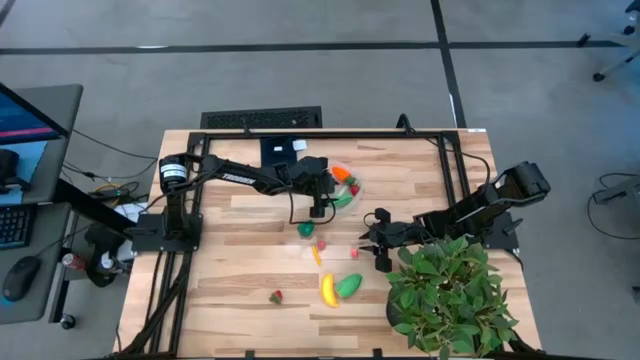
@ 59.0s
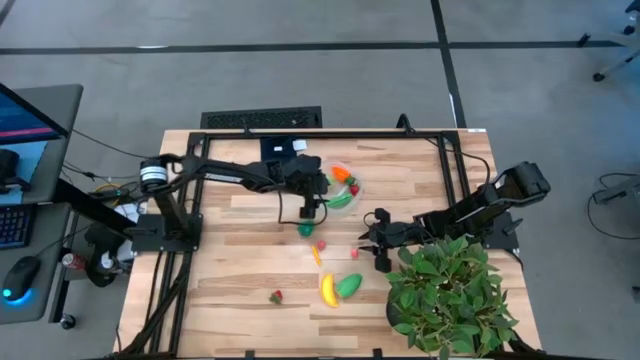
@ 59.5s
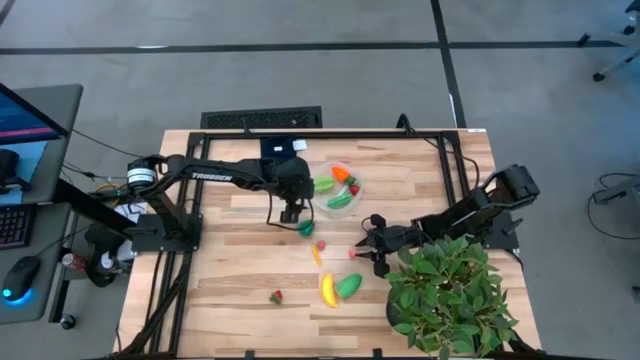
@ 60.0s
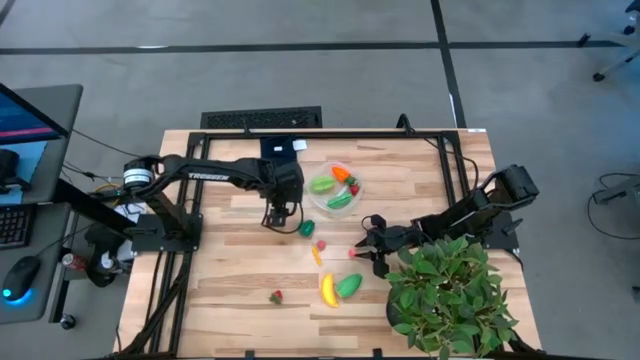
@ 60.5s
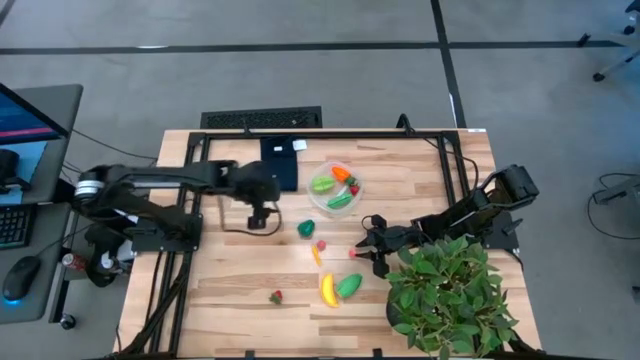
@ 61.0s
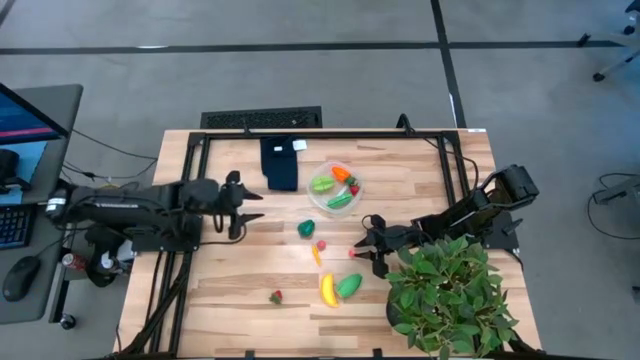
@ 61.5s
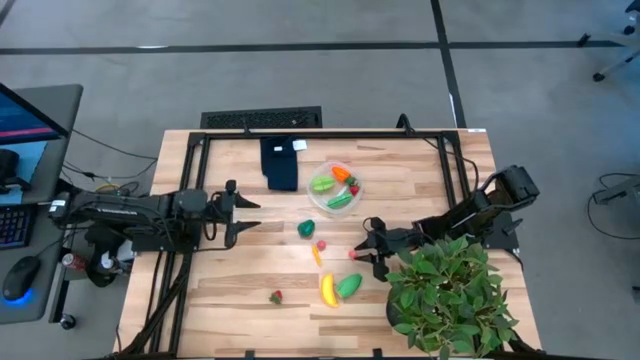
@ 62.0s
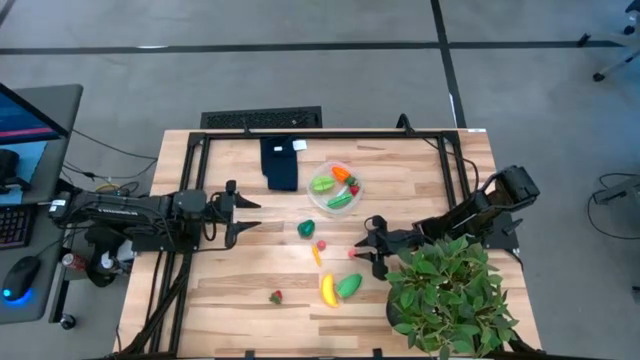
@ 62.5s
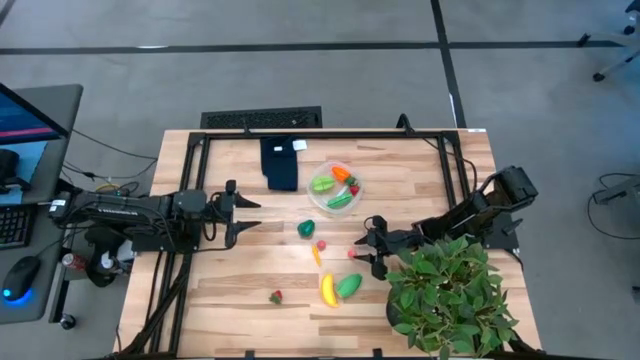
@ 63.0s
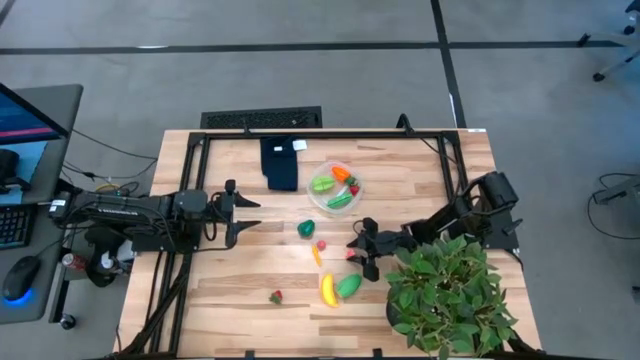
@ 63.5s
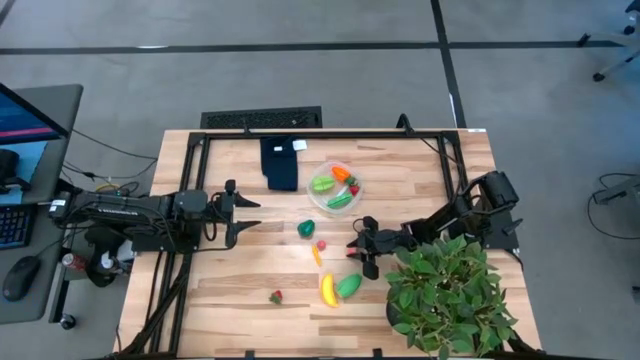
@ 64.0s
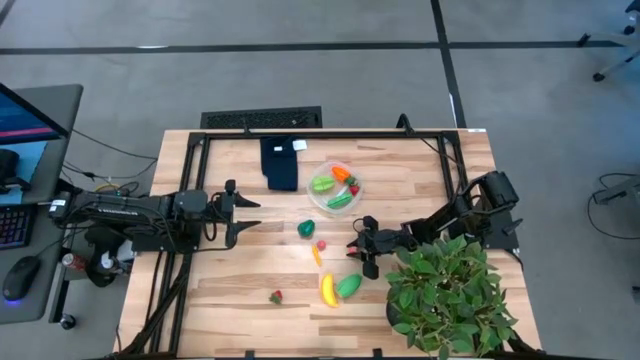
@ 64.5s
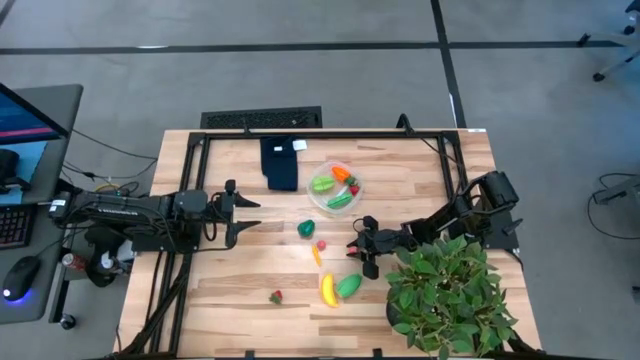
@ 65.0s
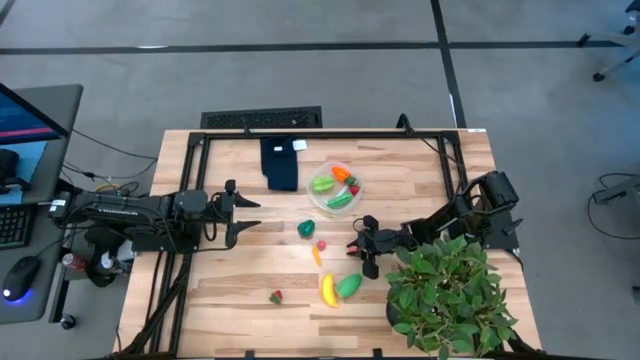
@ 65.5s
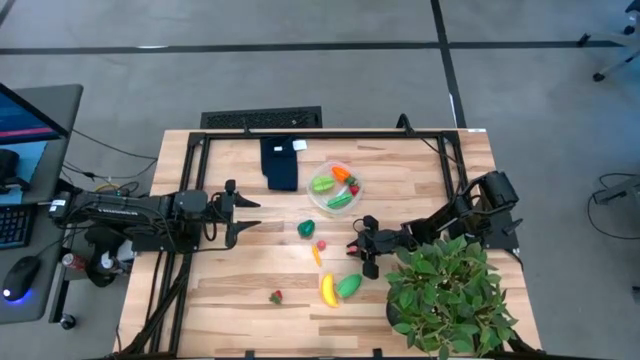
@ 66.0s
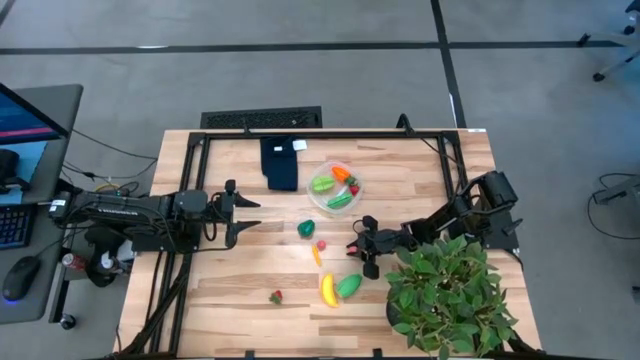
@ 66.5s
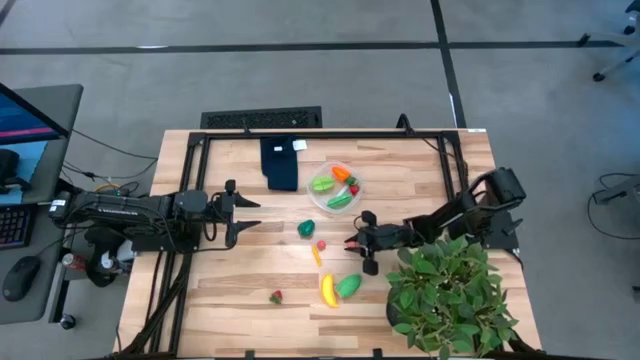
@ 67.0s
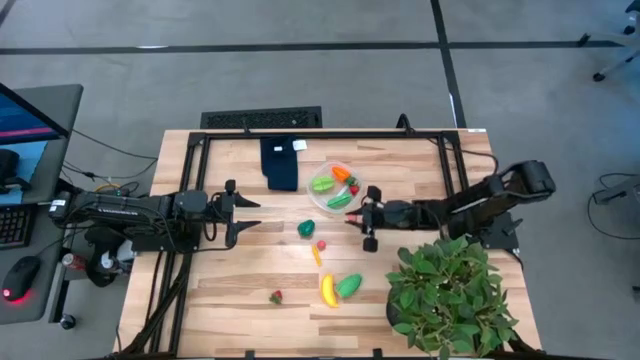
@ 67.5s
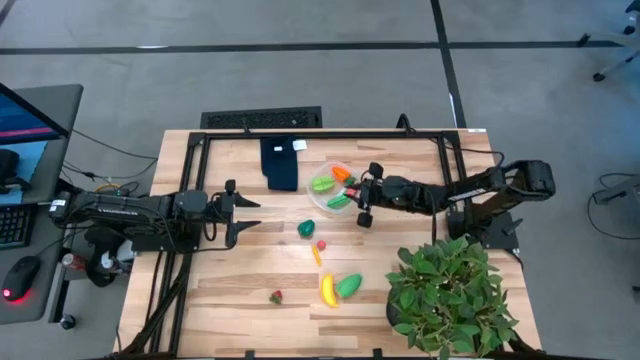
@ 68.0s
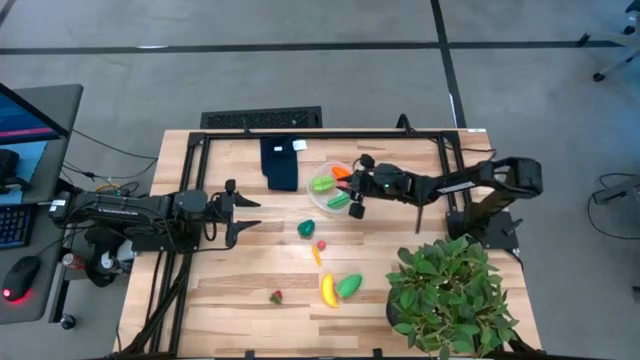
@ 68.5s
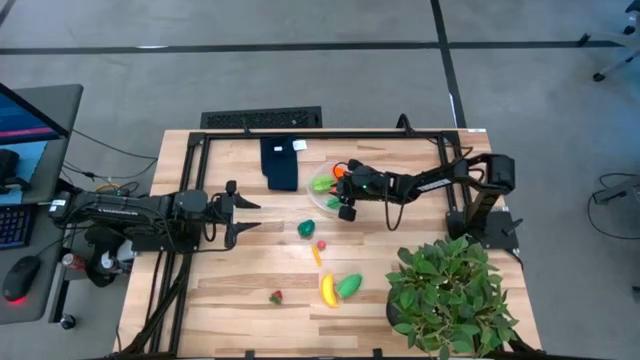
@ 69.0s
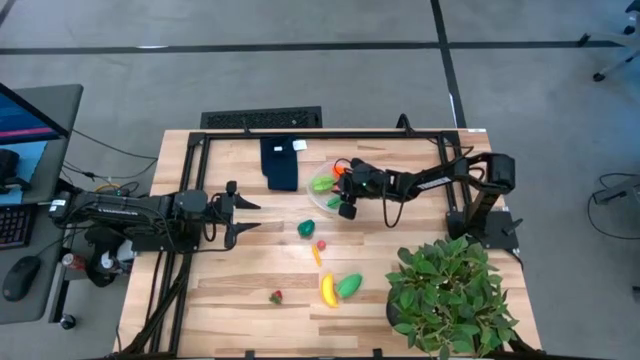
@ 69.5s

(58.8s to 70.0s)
Task: Pick and placing Produce into tupperware
Put the right pink peach into the transparent container

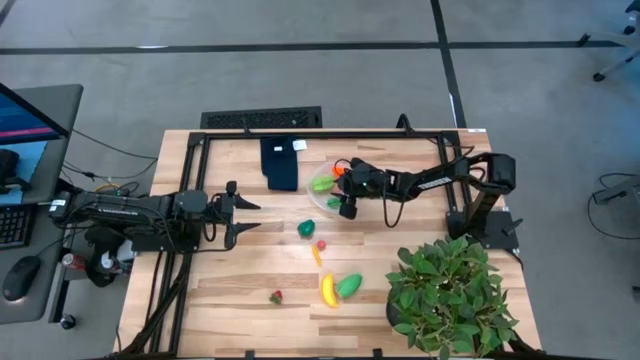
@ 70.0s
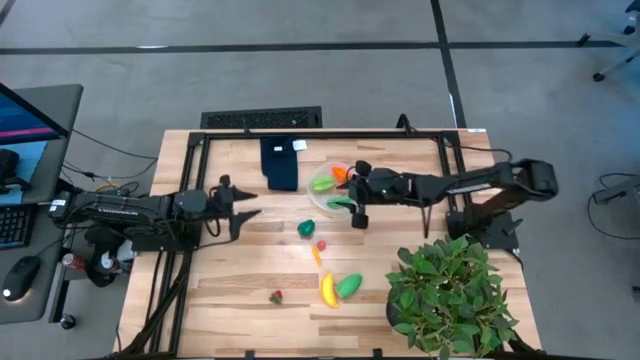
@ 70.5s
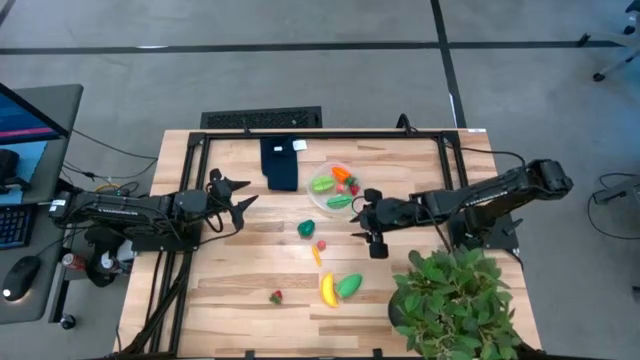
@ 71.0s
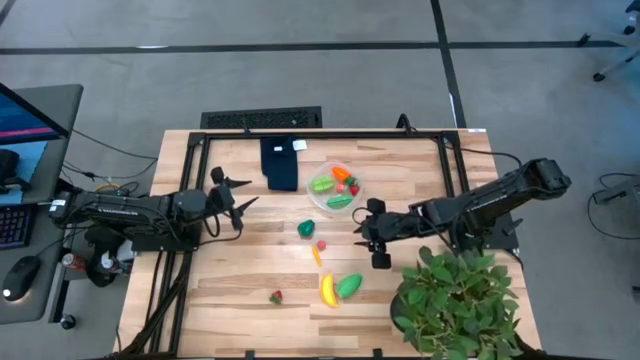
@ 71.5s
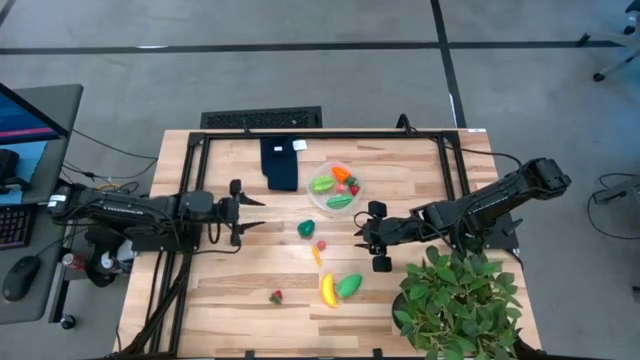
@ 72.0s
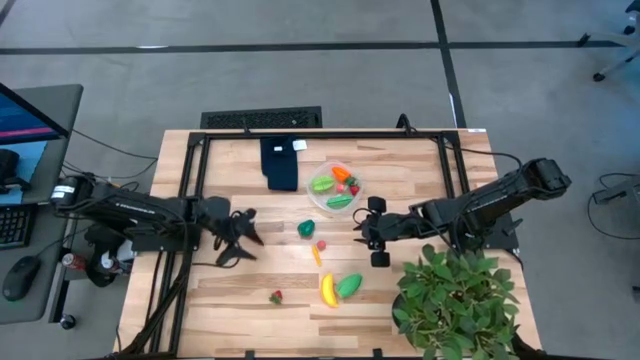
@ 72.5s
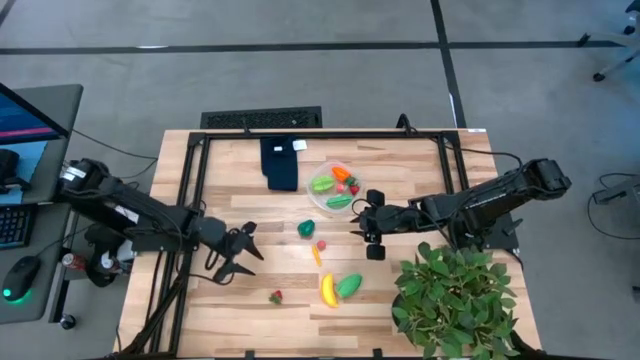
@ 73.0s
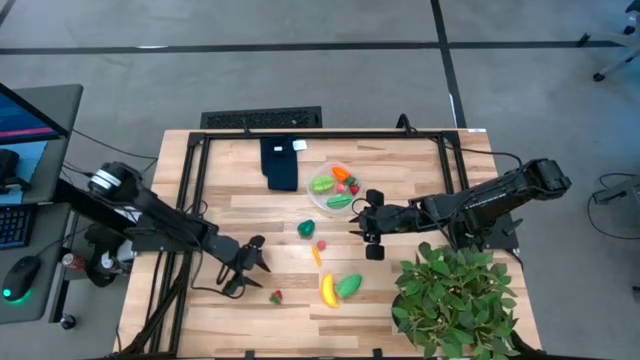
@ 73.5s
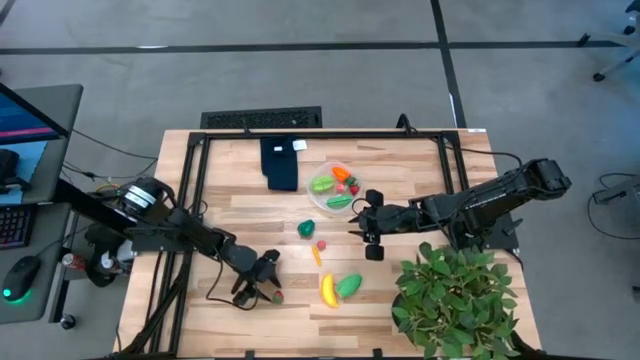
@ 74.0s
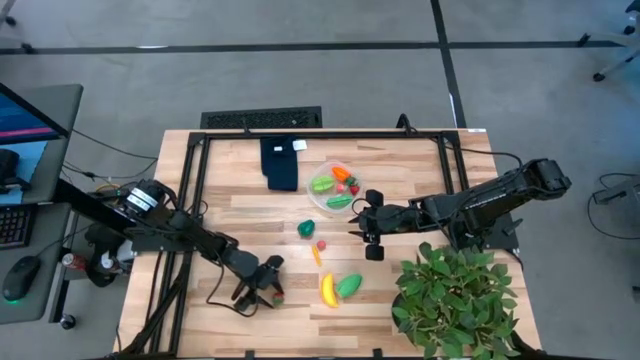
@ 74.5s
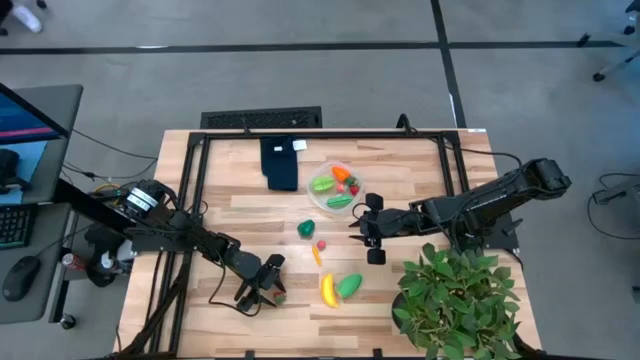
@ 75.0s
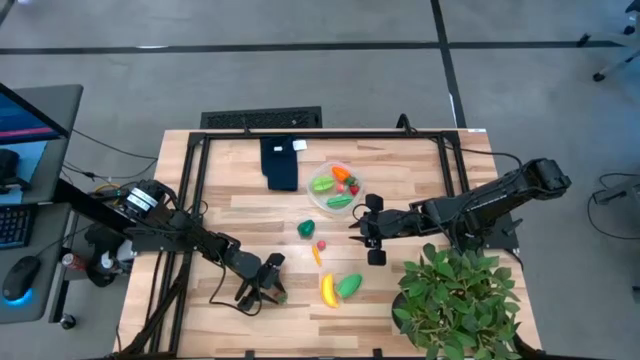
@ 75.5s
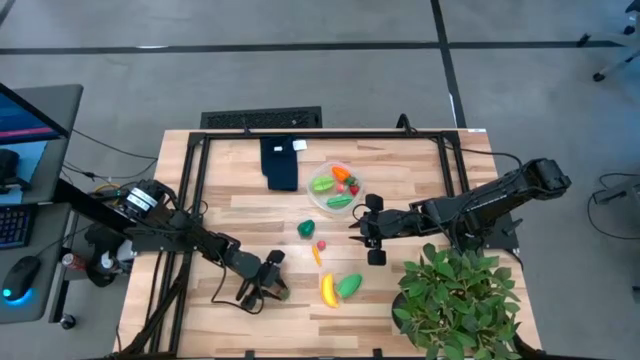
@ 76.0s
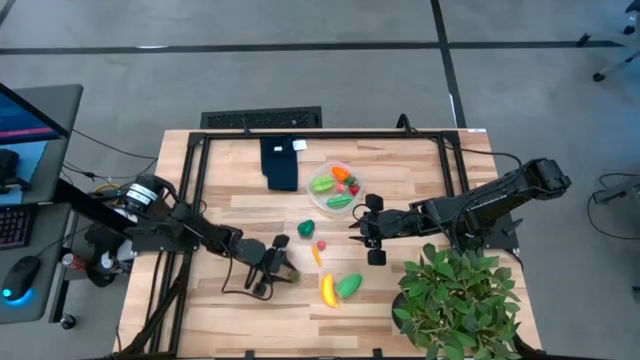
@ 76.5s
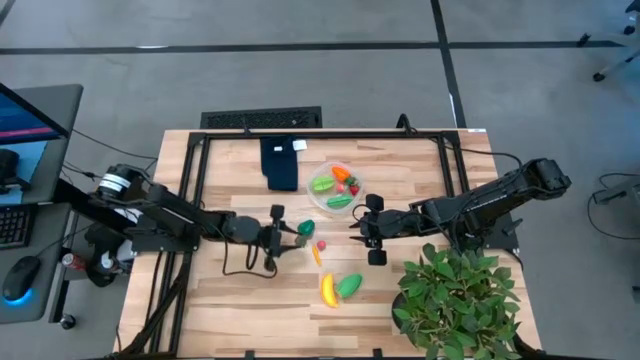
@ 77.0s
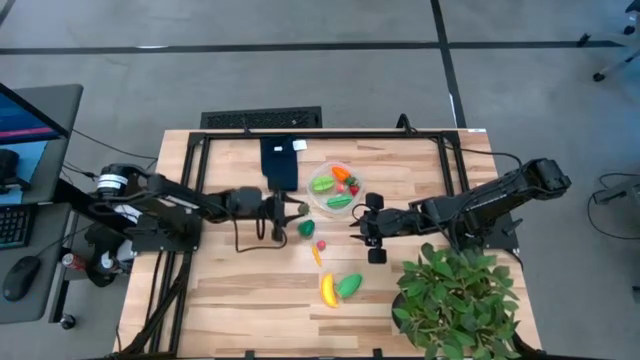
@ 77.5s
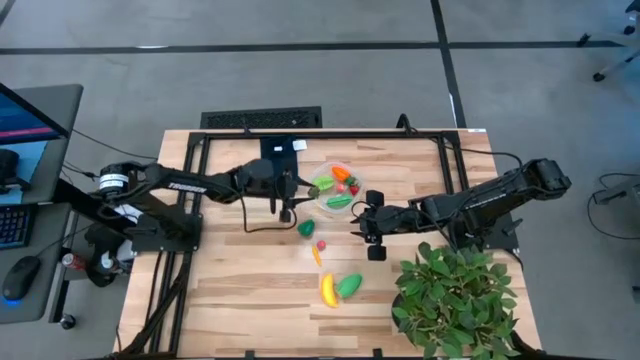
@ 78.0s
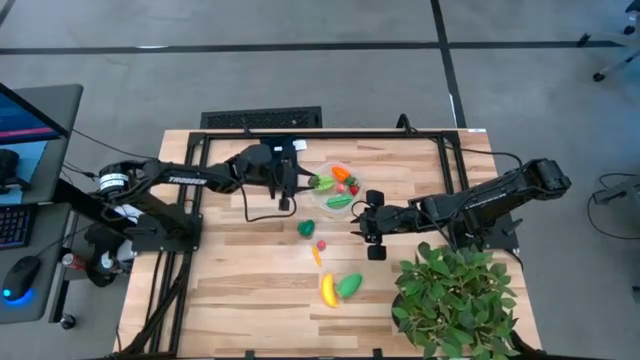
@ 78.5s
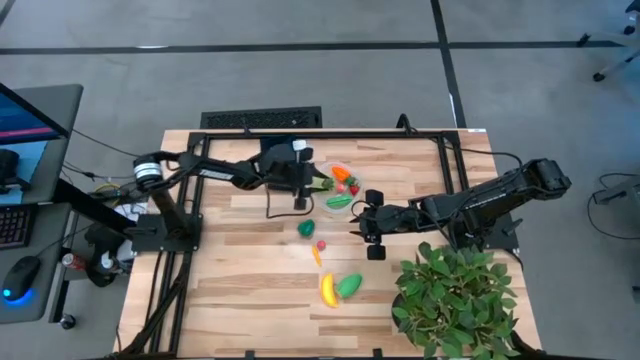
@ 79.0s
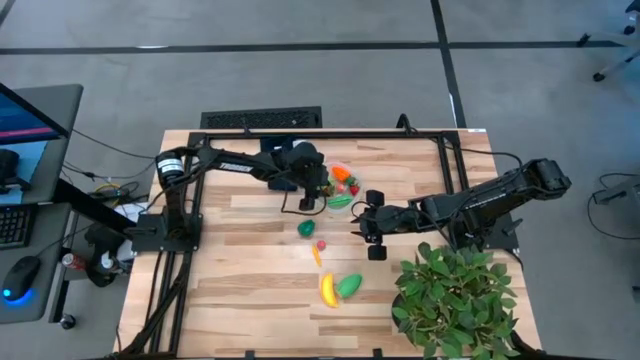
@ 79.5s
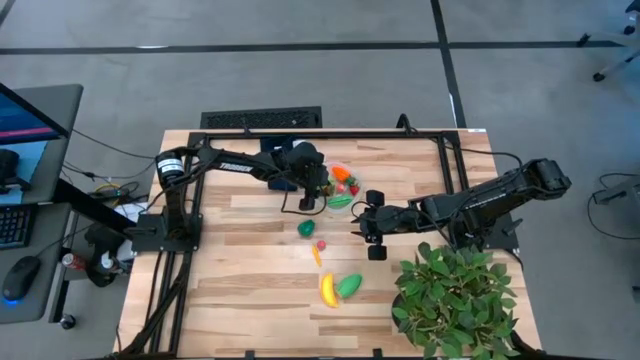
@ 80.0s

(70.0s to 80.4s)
Put the red strawberry into the transparent container

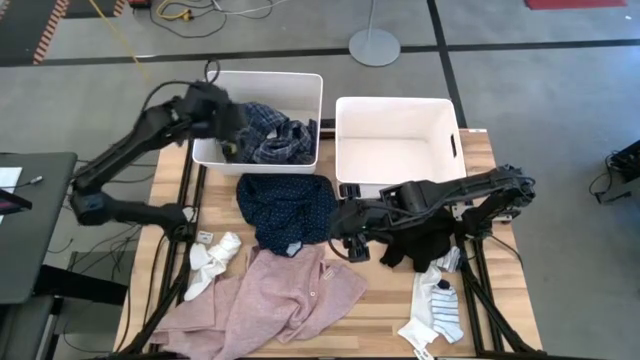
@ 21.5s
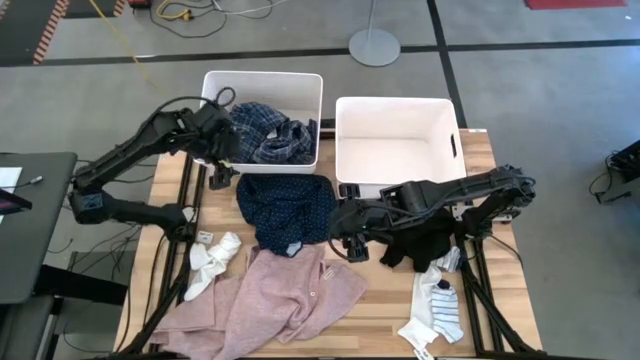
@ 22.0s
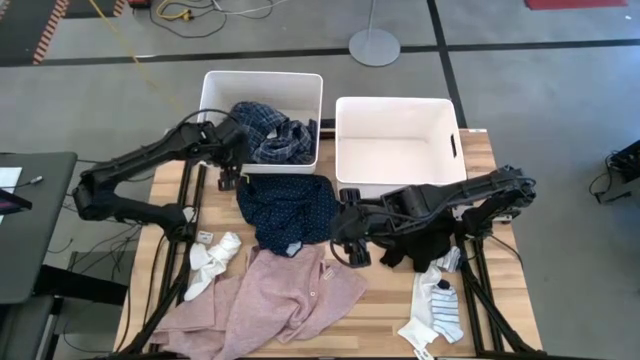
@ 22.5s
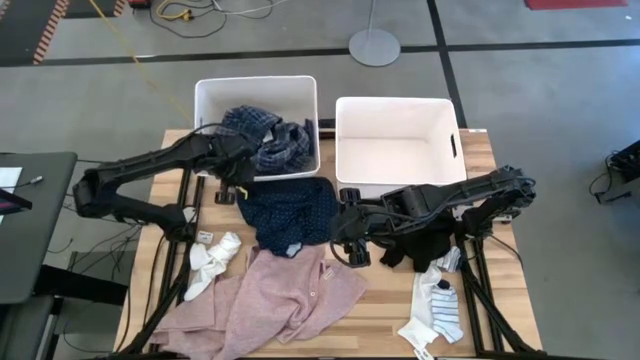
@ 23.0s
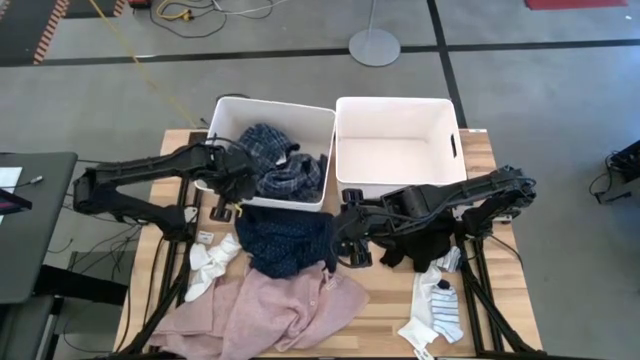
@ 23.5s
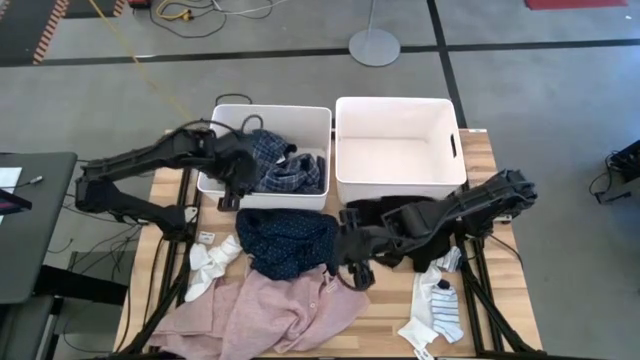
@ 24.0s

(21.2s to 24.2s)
Task: Sort clothes
Adjust the left white laundry bin
